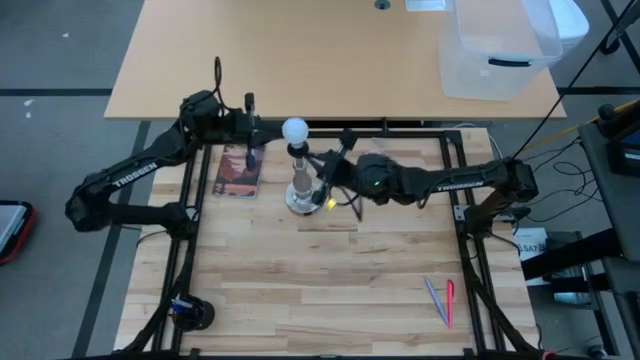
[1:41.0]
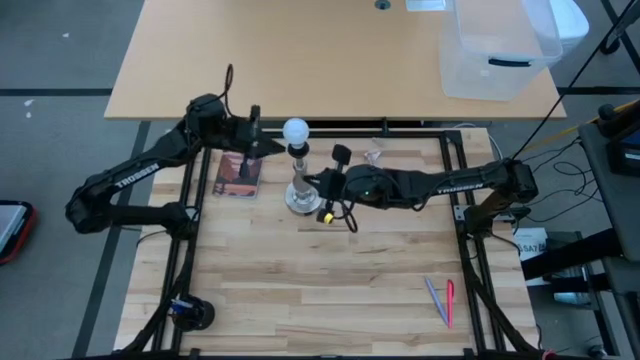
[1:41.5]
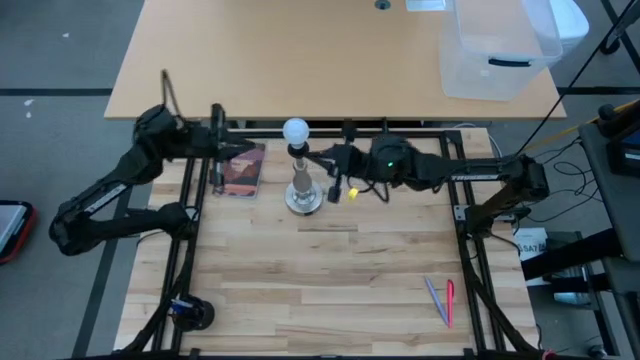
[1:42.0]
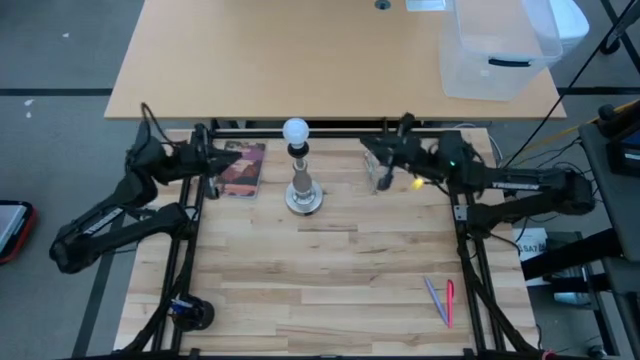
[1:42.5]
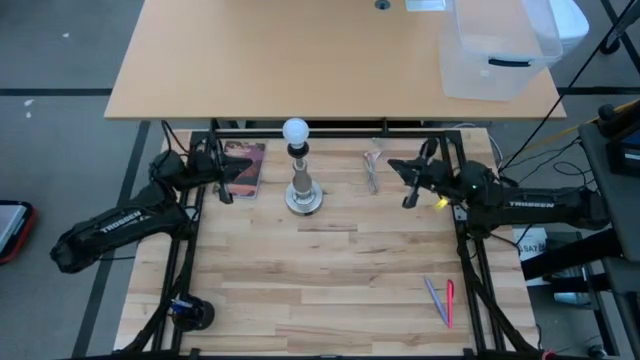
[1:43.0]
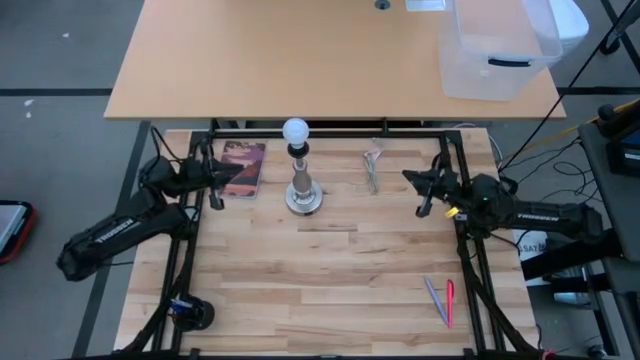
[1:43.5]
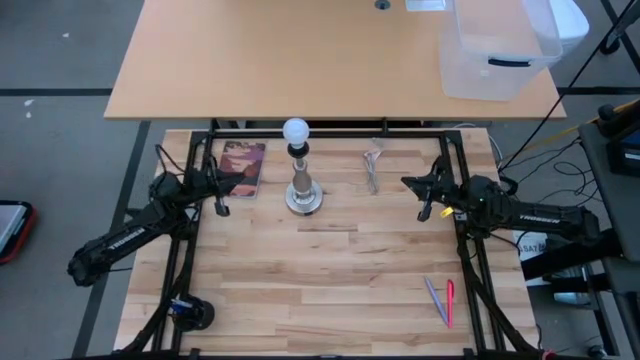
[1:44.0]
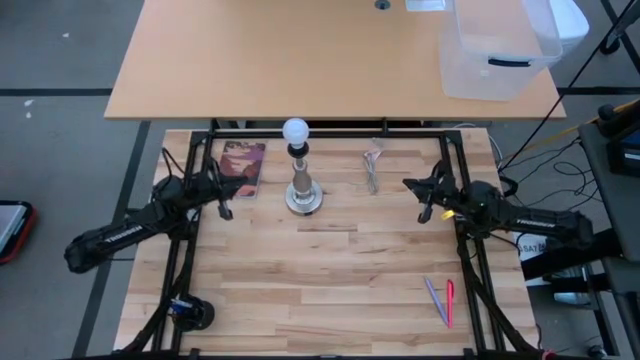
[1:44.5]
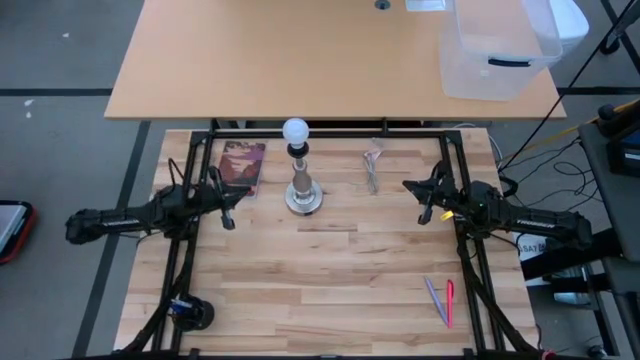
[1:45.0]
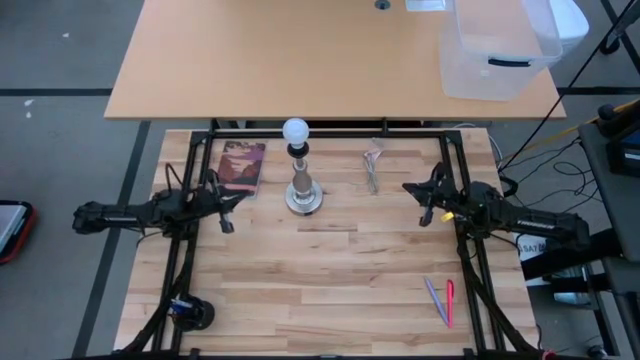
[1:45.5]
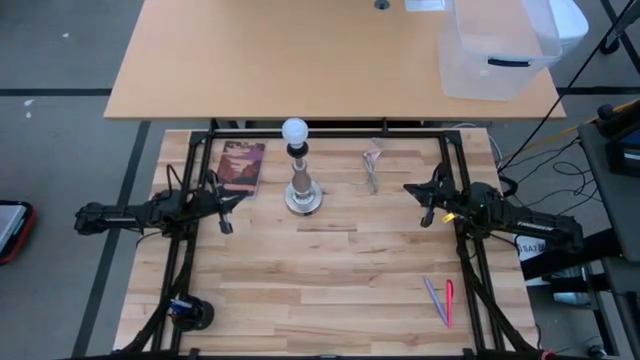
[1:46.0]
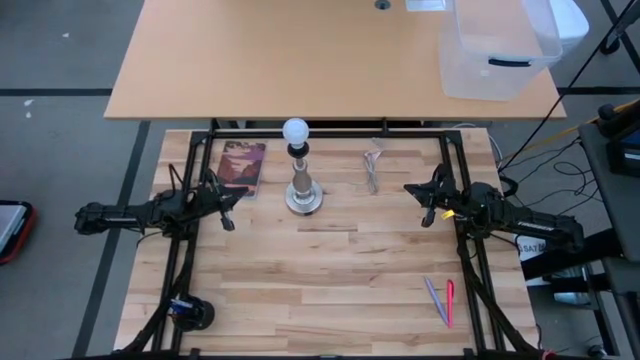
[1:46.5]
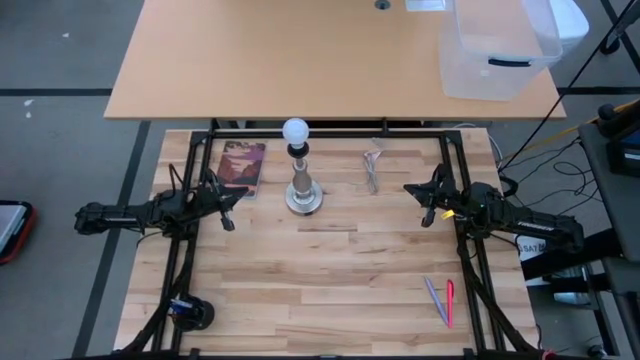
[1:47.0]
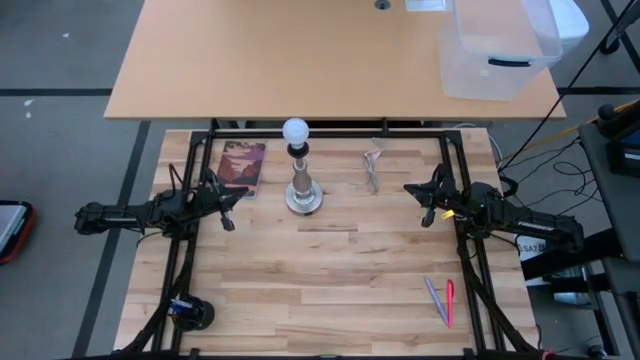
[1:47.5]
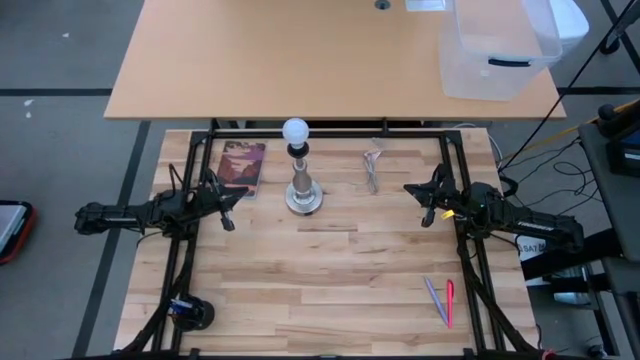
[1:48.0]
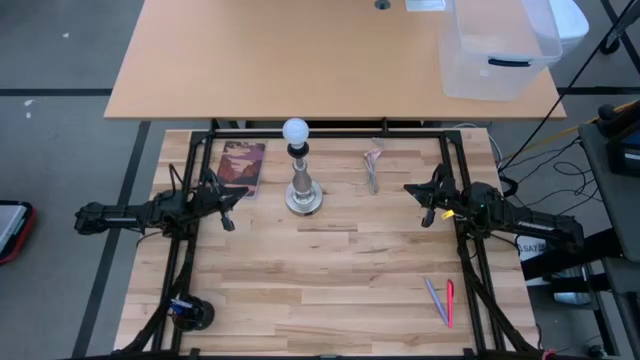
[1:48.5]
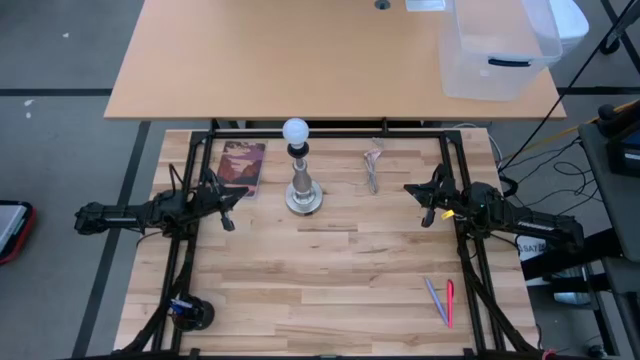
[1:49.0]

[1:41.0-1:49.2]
Task: Screw lightbulb
Return to Home Position

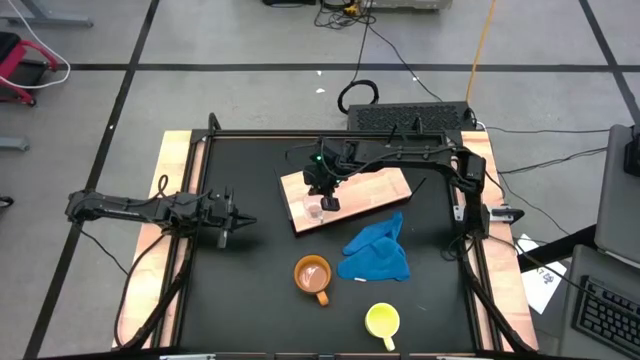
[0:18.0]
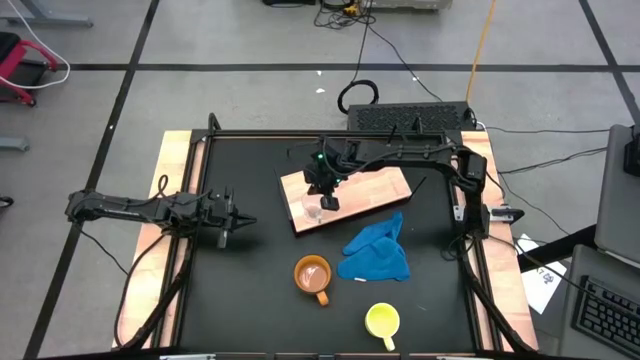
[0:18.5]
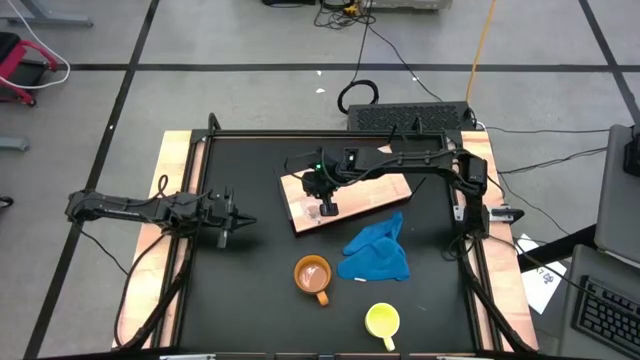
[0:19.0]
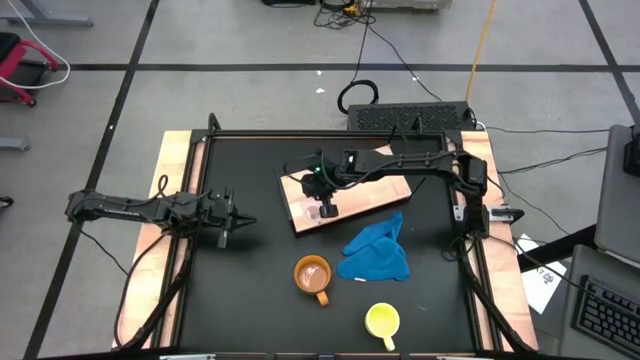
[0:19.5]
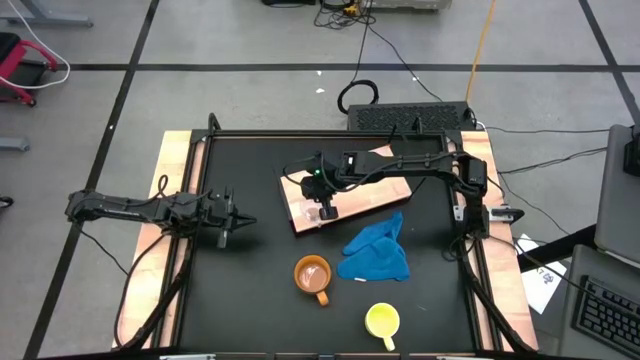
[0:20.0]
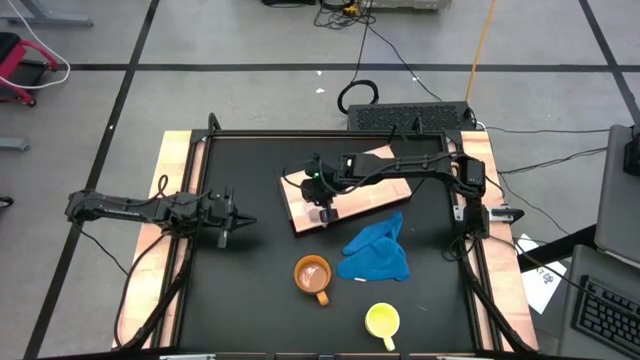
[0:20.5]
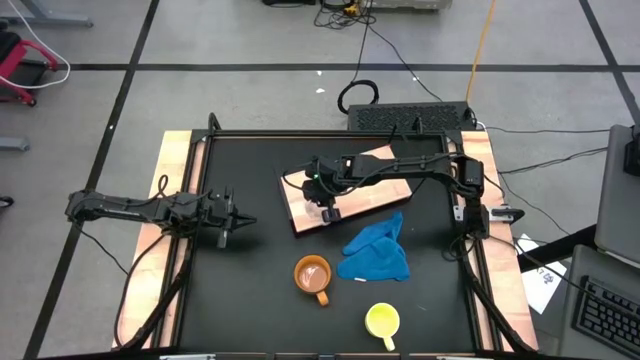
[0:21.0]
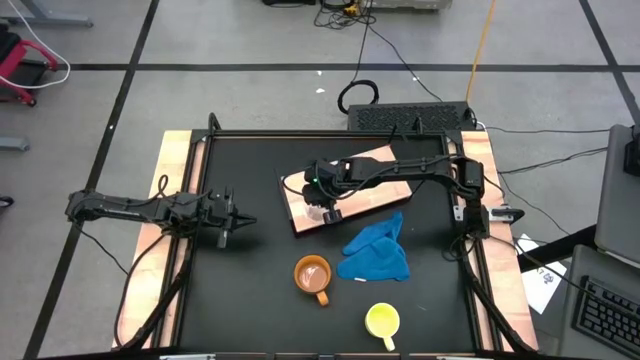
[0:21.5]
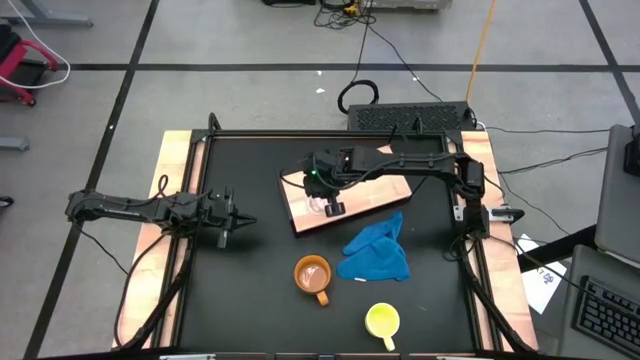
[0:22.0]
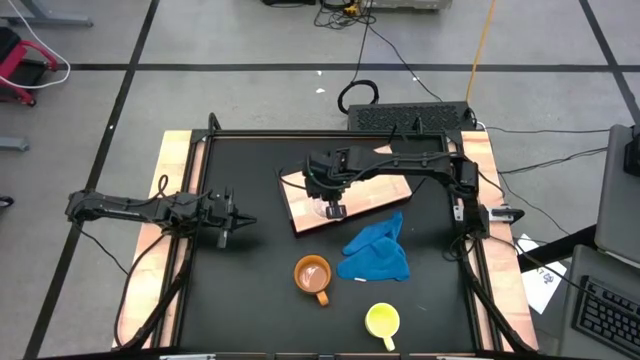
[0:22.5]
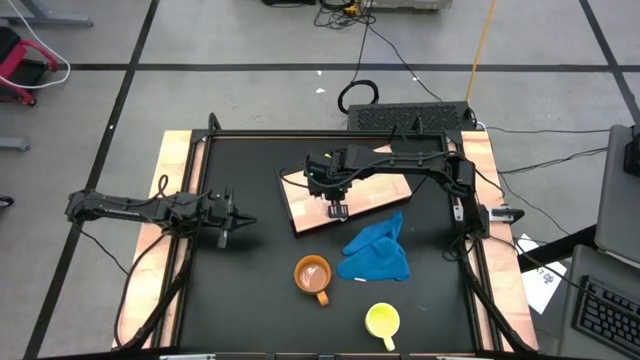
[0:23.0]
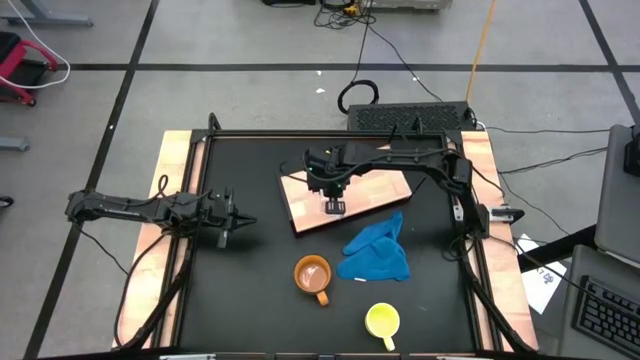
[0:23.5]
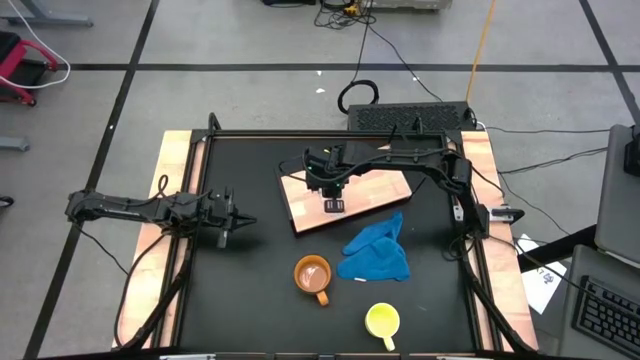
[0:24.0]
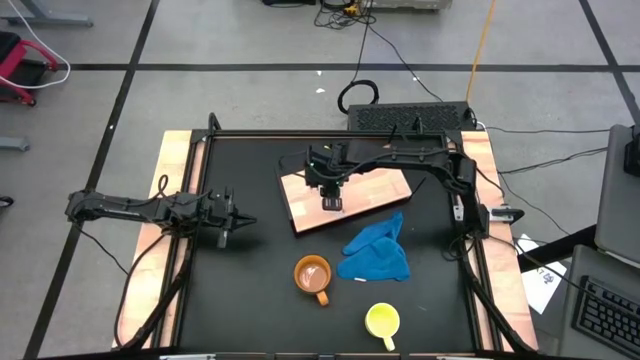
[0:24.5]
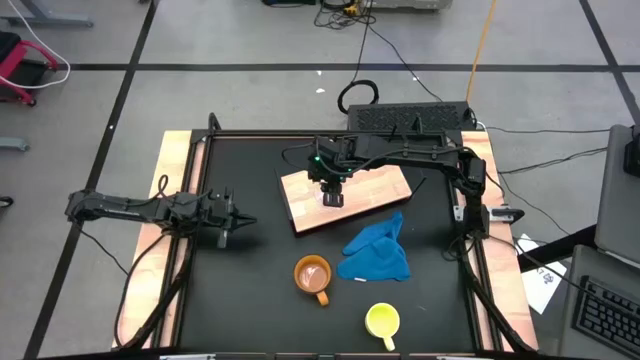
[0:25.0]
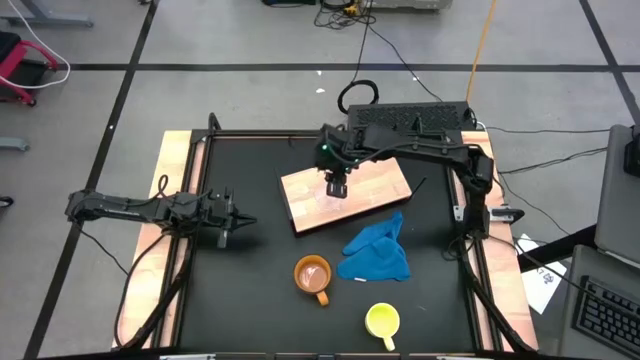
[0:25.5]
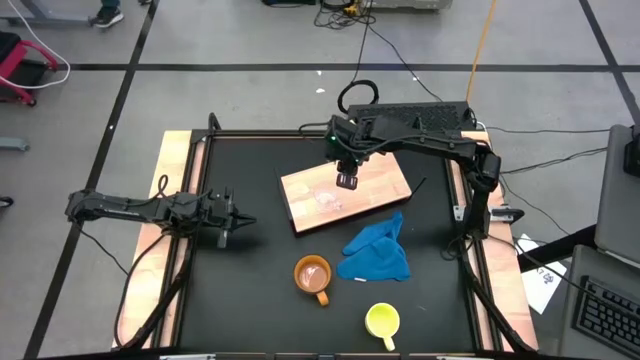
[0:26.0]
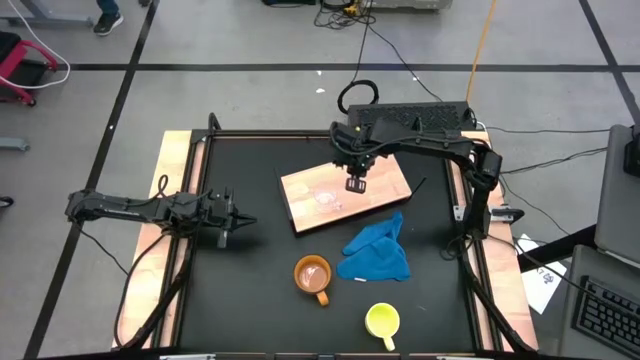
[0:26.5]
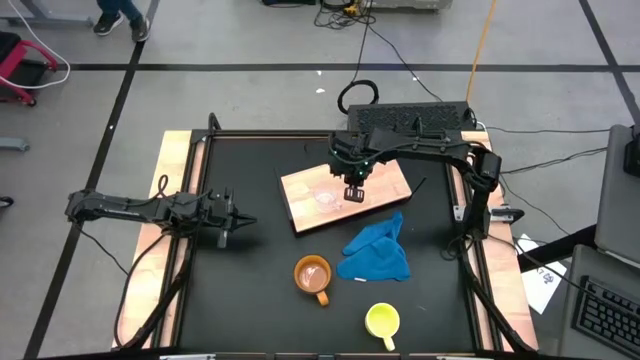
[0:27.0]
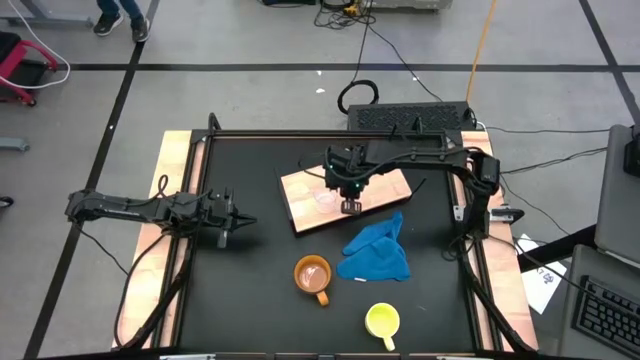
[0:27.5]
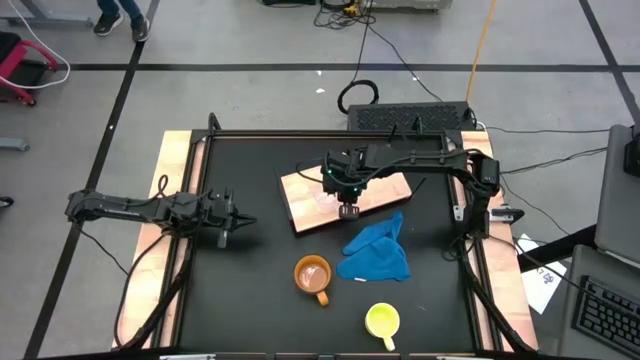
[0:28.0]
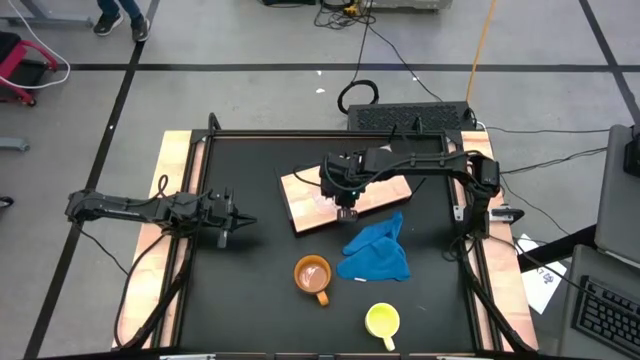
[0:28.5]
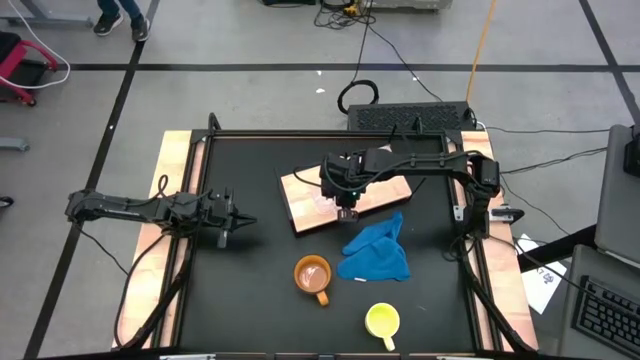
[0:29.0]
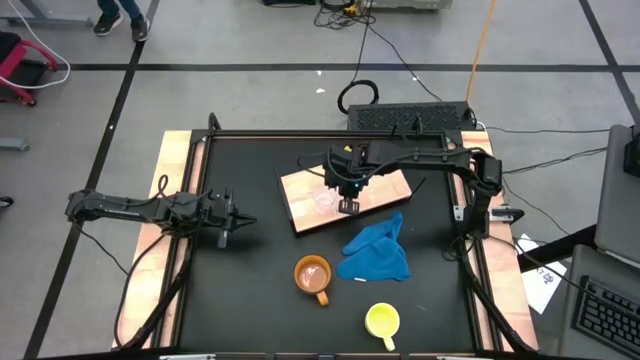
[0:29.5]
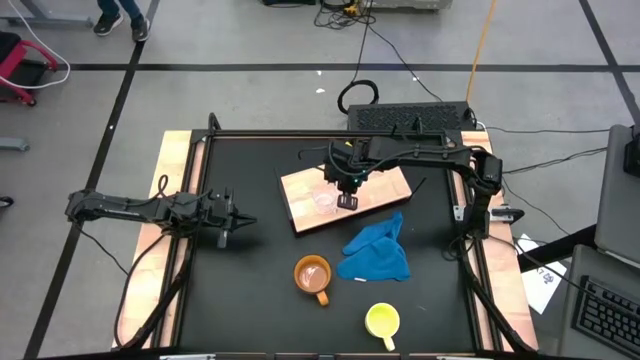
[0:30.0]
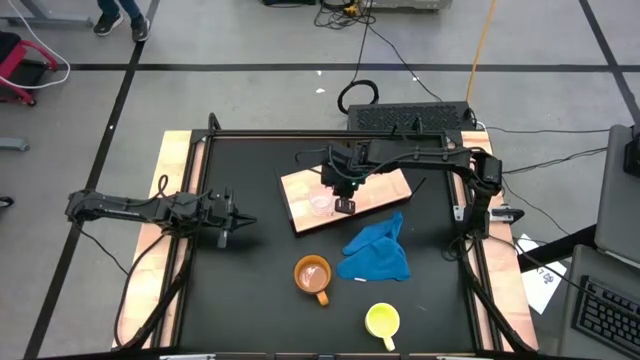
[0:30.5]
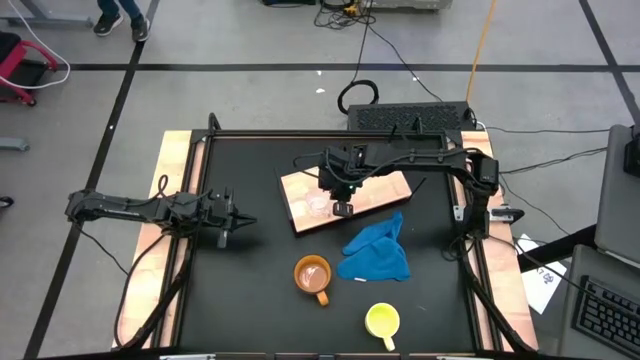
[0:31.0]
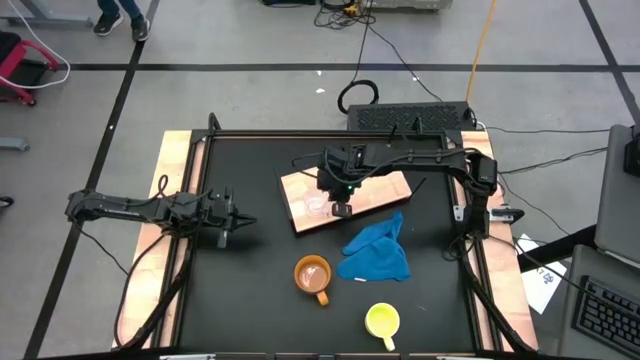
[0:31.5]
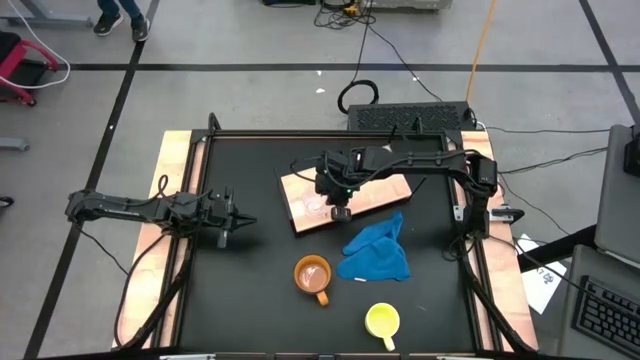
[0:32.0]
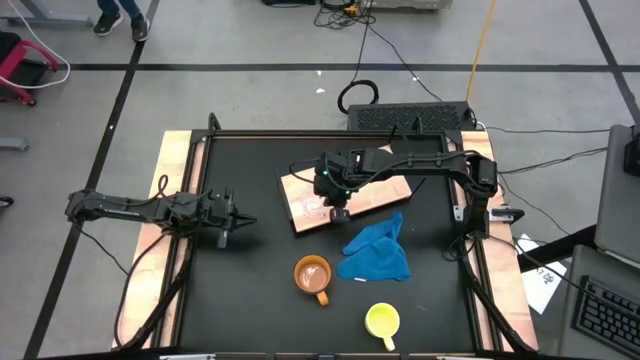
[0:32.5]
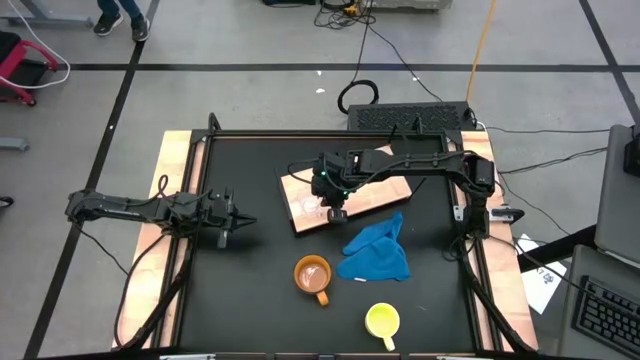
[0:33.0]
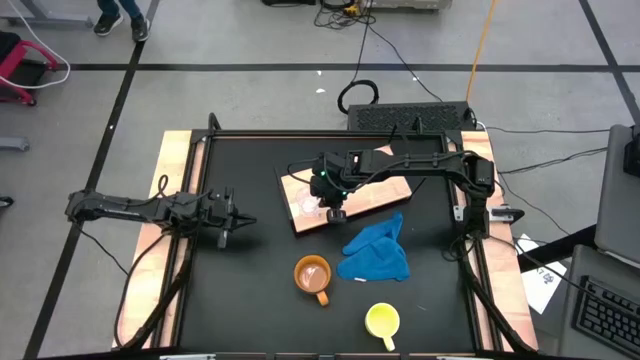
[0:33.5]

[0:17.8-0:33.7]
Task: Stack small to large cups/mugs on shelf
Put the transparent mug on the shelf
